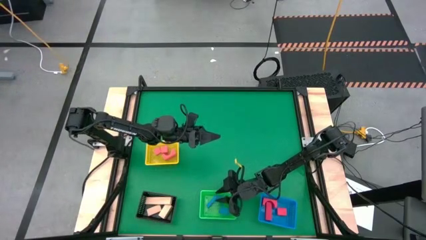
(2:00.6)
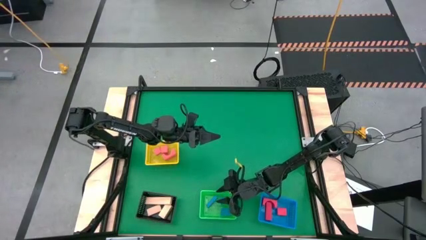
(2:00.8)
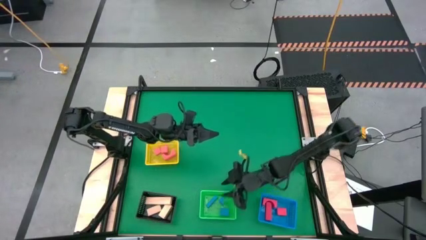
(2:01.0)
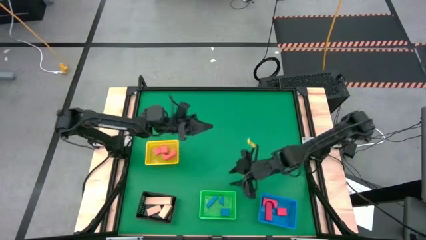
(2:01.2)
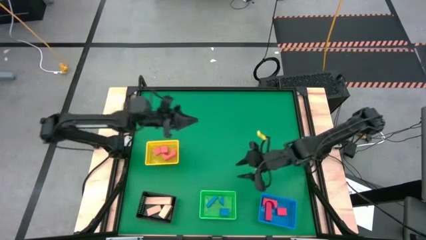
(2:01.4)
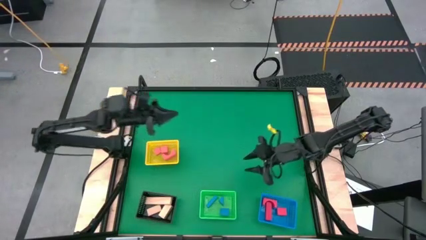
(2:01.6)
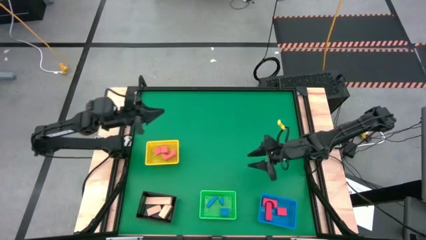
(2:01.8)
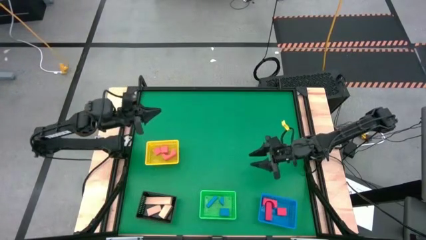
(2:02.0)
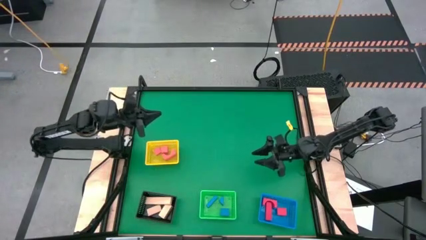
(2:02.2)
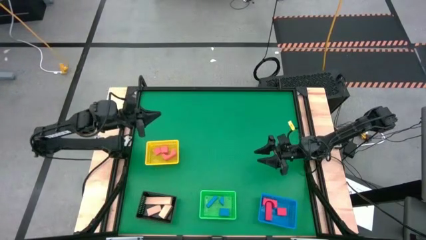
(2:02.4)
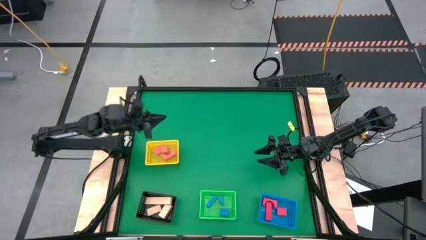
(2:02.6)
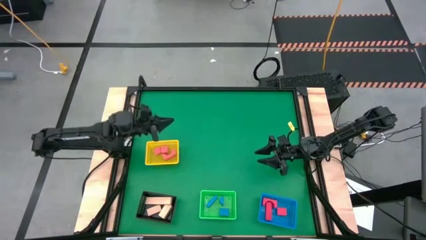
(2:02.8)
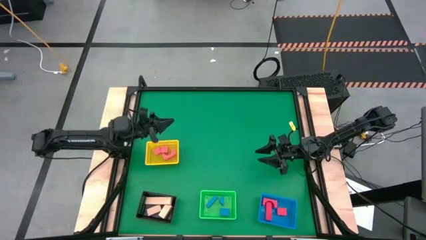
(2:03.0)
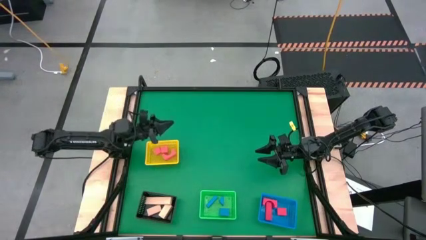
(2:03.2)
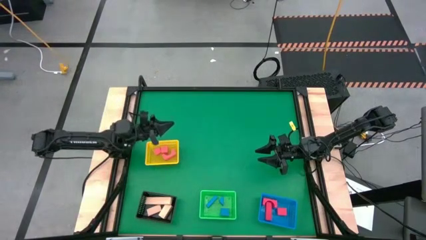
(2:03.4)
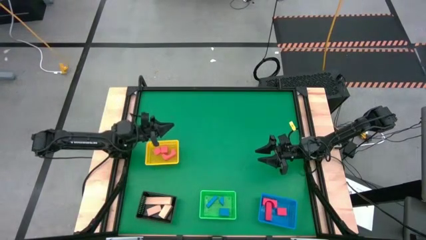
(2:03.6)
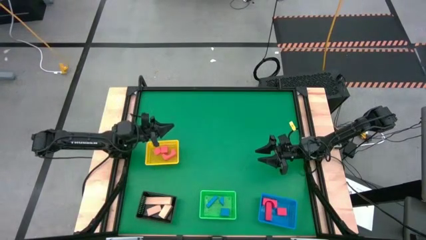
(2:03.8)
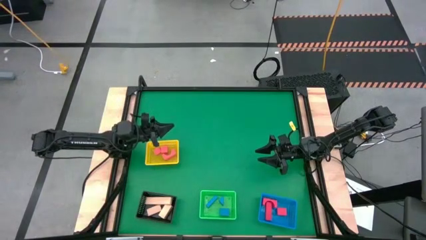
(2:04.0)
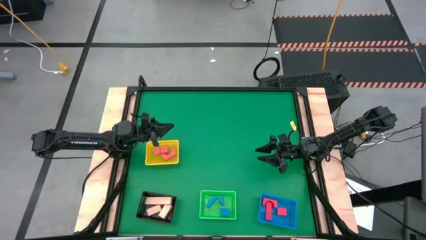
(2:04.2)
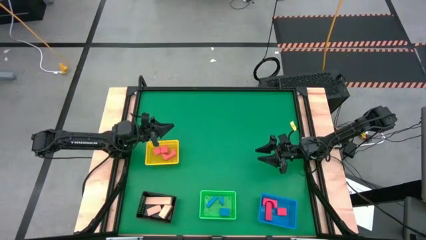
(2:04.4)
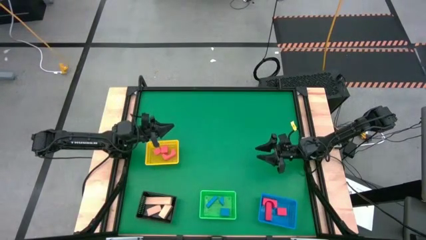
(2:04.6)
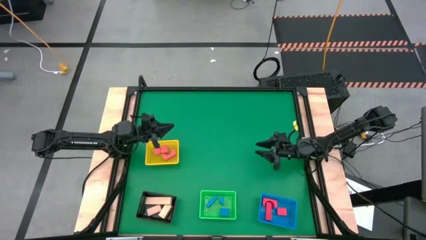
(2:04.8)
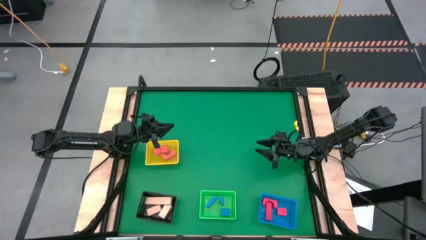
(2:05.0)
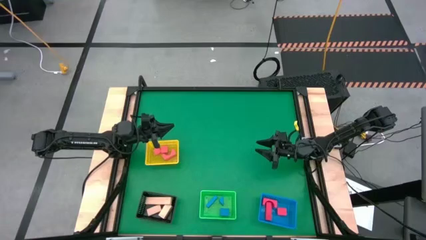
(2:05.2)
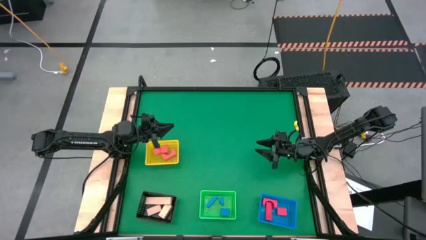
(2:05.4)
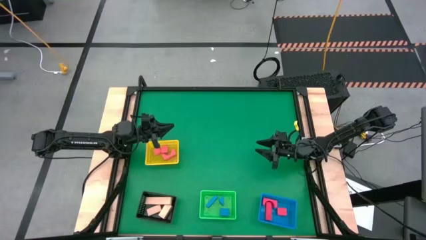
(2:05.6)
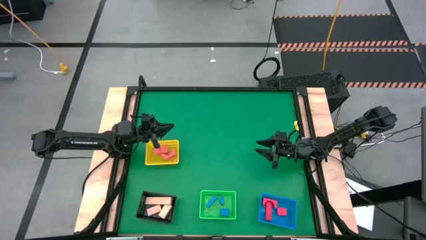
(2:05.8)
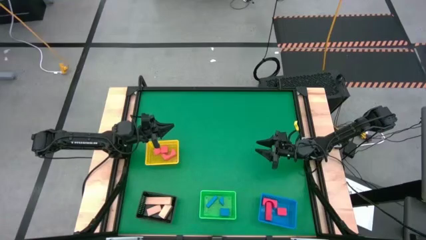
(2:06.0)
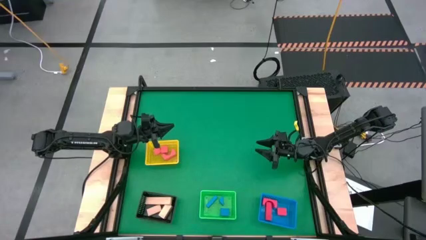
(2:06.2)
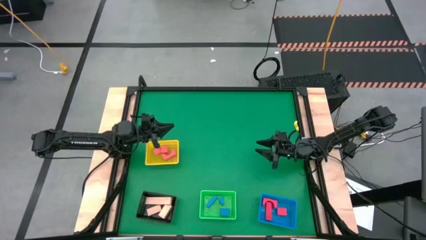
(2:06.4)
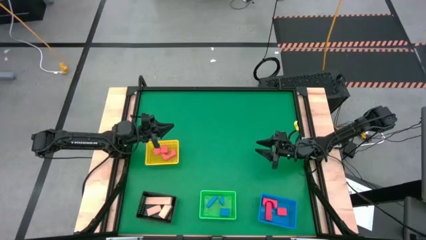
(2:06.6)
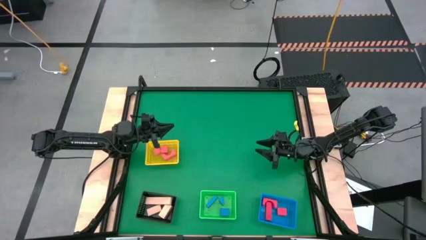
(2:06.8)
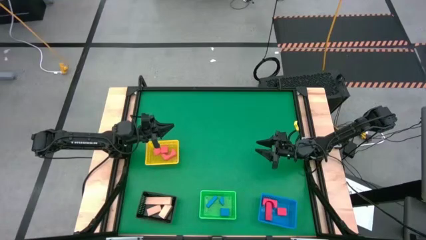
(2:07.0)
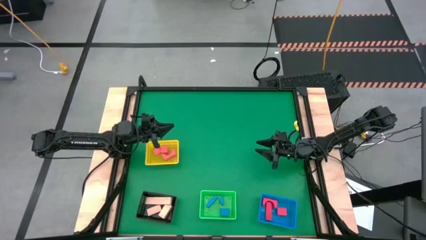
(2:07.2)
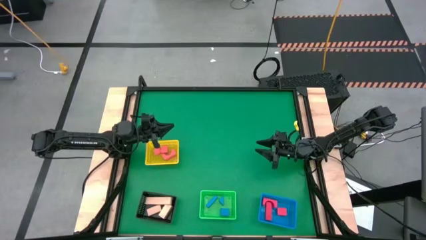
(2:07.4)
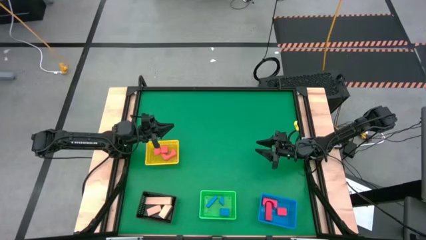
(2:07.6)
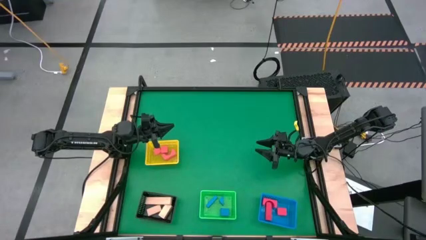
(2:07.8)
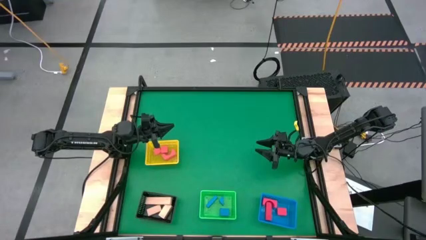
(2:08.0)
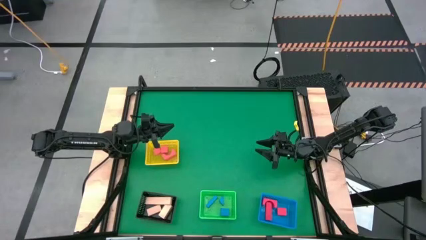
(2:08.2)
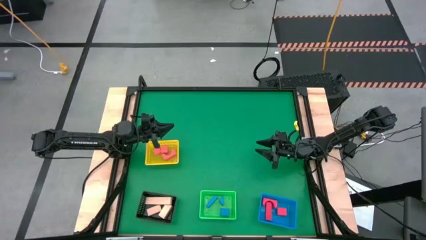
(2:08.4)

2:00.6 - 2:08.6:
Task: Sort & place blocks by color
Return to Home Position

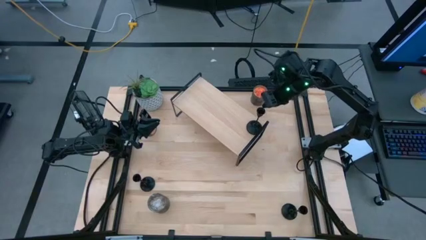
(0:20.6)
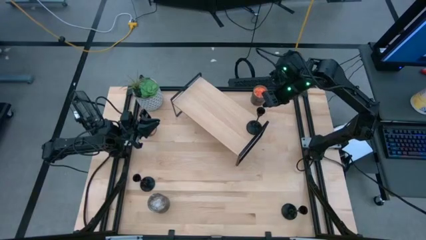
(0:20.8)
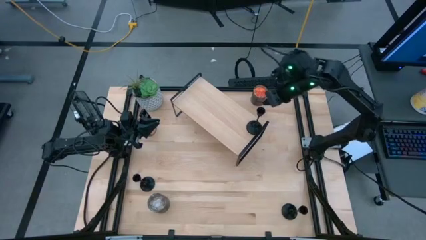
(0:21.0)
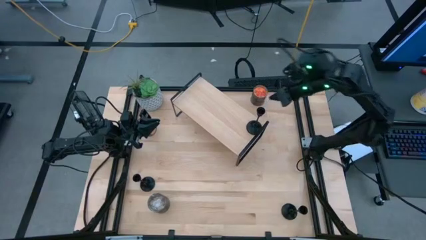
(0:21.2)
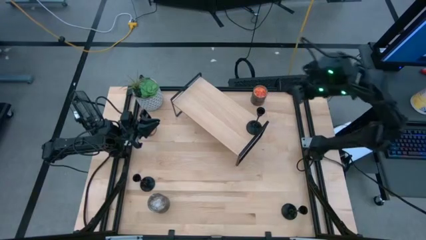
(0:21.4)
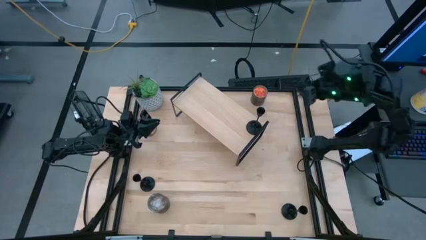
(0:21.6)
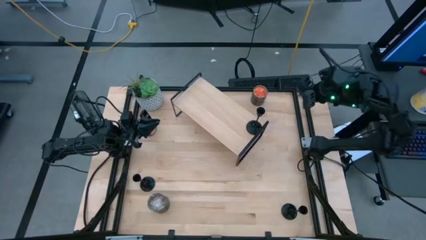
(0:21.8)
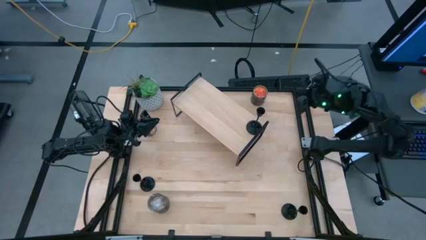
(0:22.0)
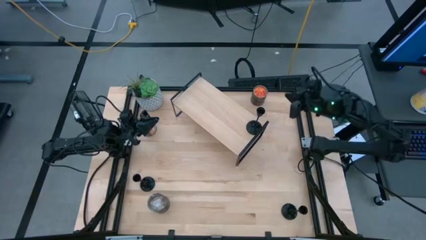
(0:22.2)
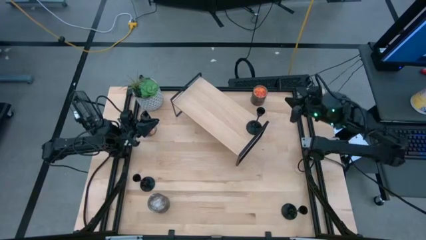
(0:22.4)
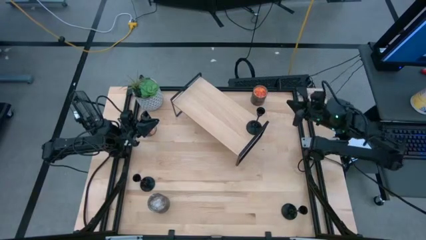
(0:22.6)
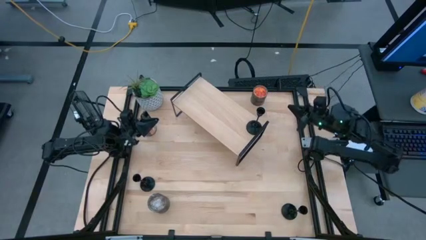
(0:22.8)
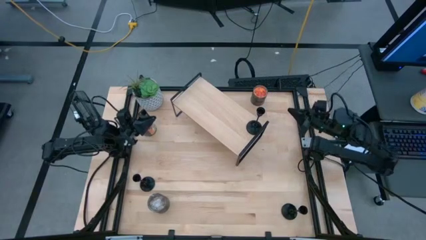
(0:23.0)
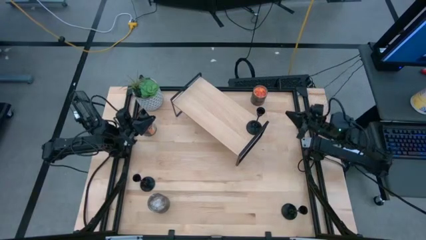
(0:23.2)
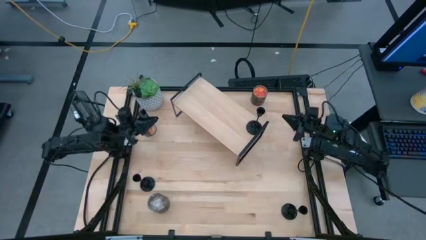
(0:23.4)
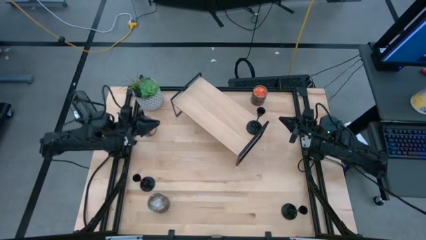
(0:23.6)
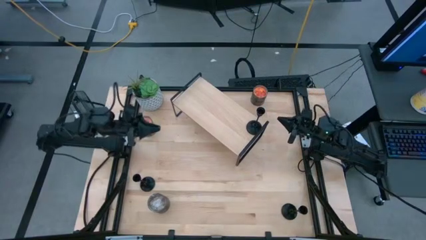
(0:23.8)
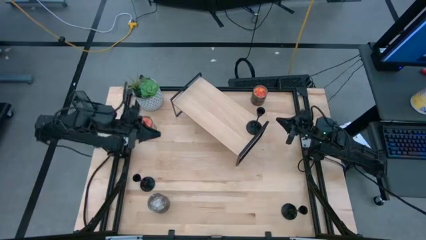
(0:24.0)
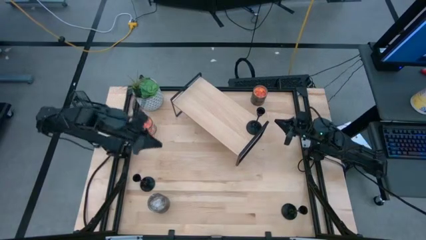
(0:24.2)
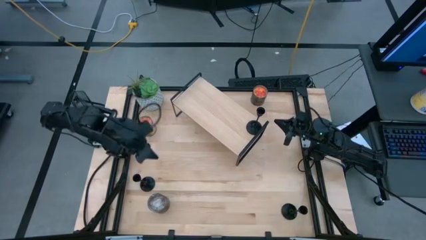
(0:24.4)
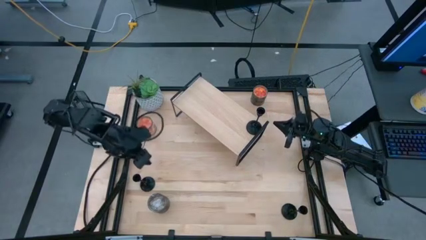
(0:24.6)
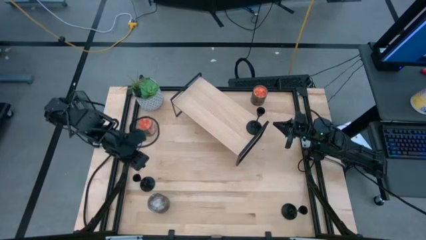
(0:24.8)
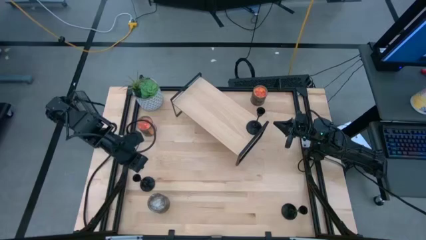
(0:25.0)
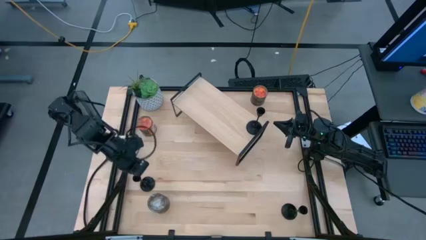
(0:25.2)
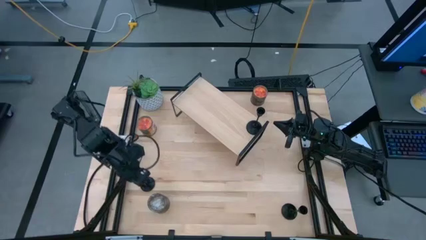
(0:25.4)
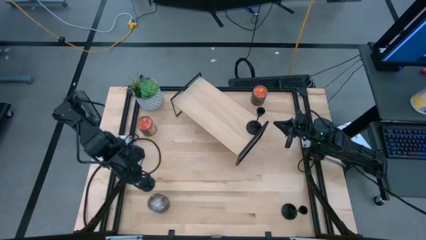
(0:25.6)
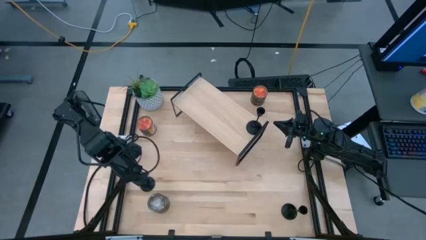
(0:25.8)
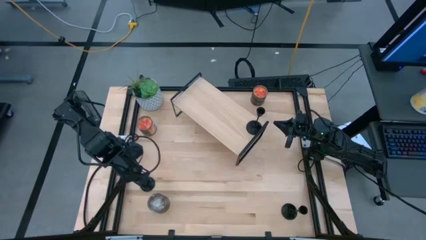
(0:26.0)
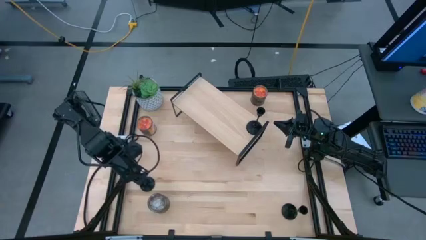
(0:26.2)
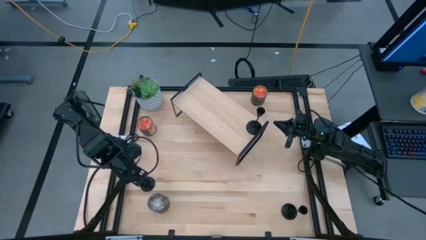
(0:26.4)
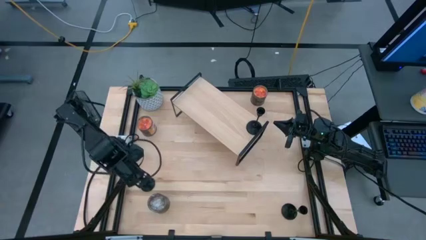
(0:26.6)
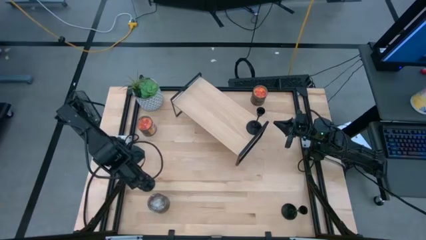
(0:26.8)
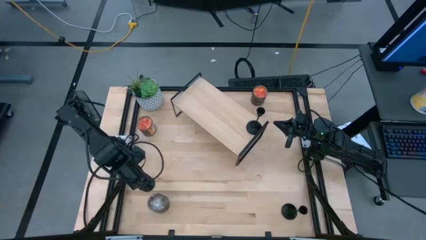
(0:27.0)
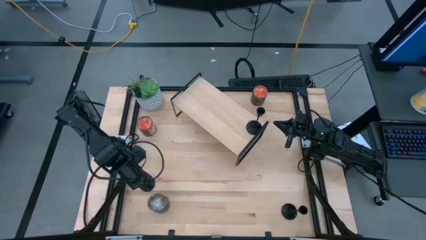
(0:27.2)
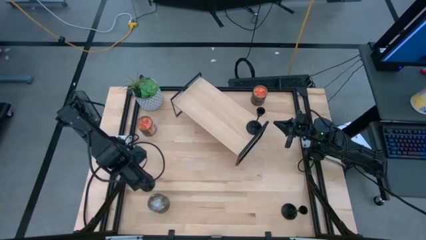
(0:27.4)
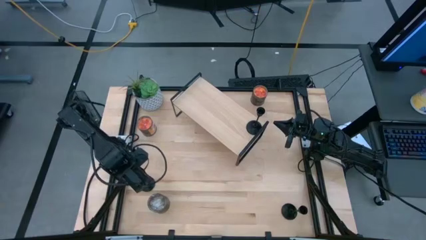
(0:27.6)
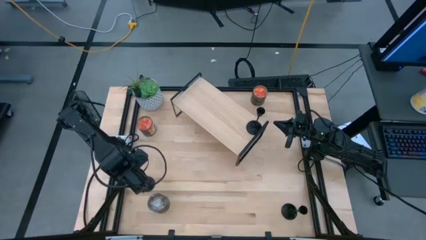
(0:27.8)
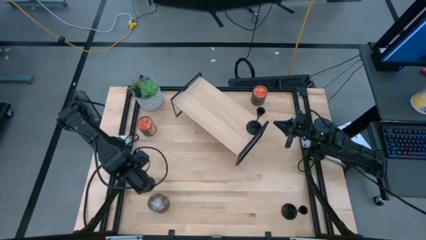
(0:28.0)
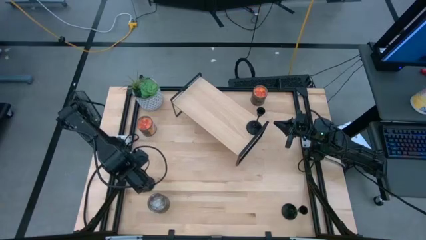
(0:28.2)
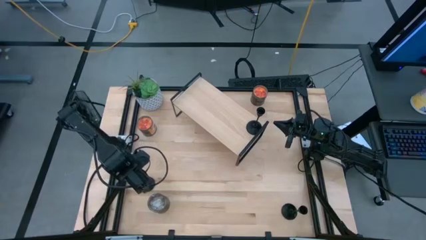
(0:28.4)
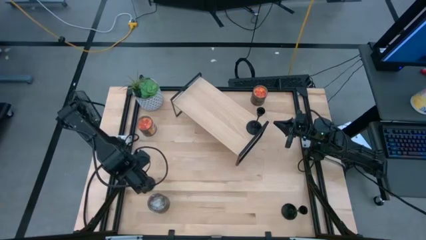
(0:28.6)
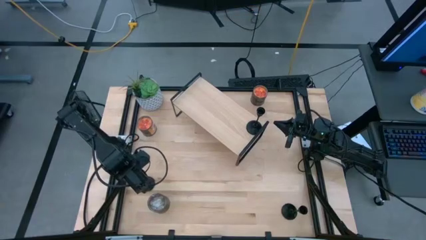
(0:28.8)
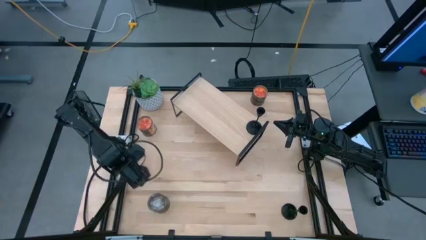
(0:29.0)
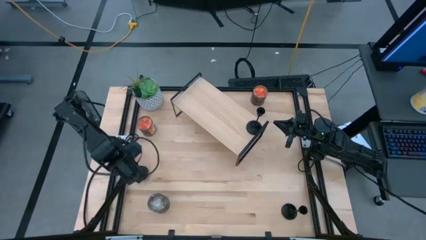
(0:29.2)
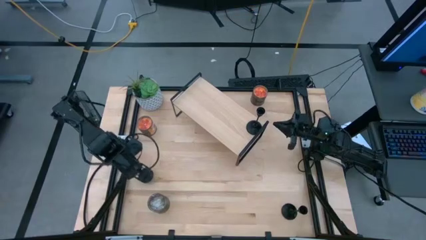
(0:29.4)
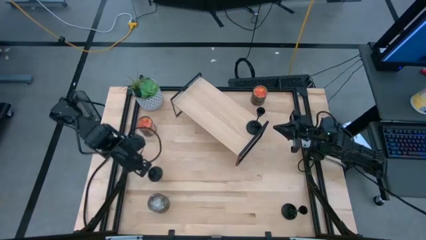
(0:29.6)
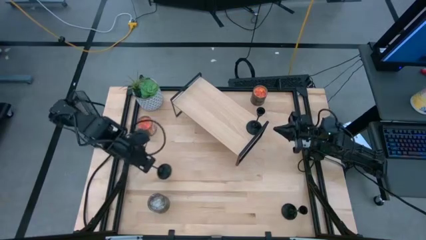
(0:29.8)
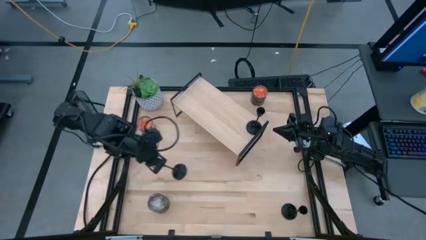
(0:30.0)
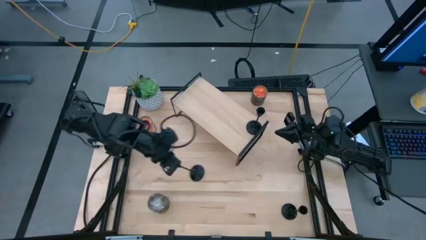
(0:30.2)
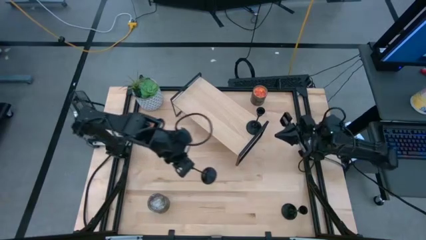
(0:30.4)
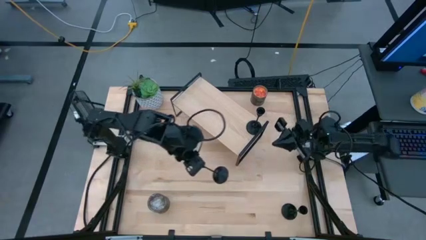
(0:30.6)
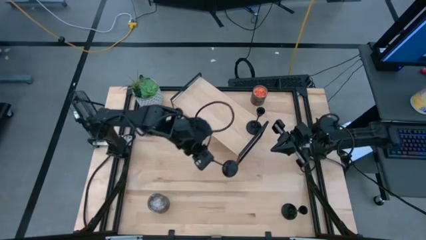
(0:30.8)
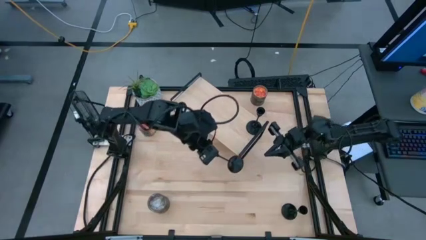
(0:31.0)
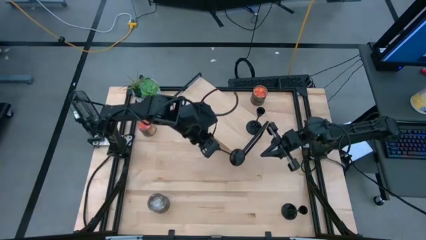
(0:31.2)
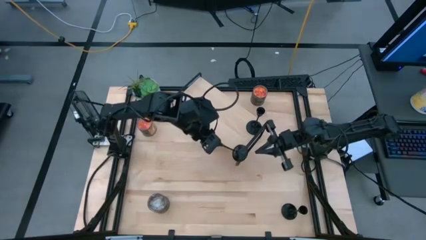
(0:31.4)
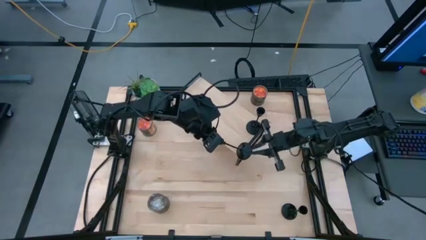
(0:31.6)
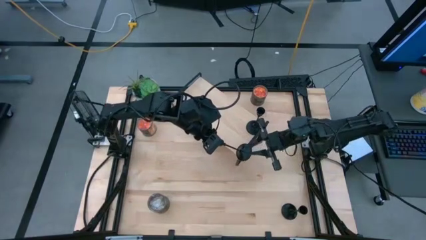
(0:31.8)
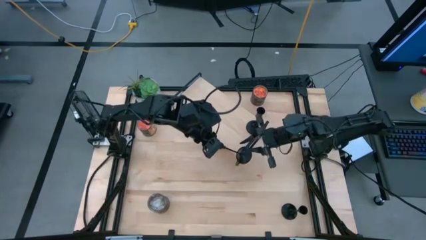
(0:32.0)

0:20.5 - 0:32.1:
Task: Pick & Place candle stick holders
Put the left black candle holder on the shelf
